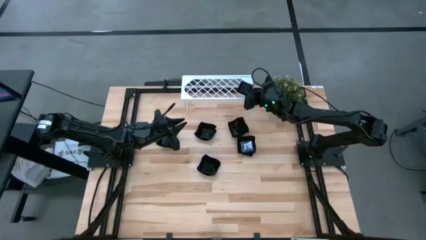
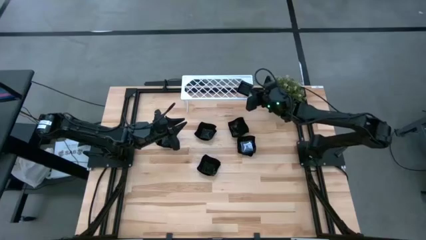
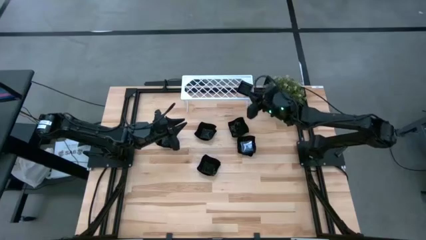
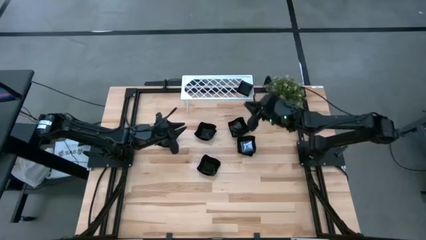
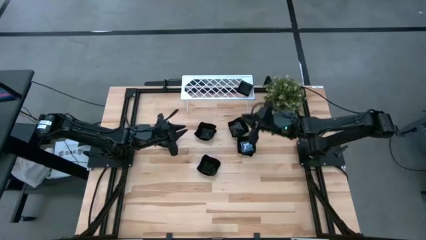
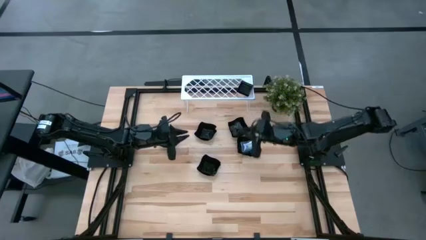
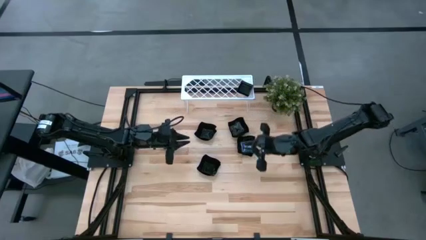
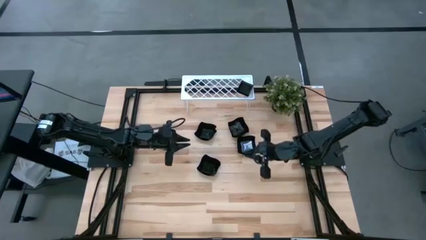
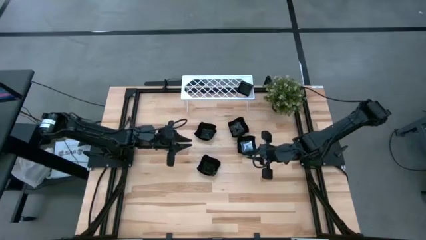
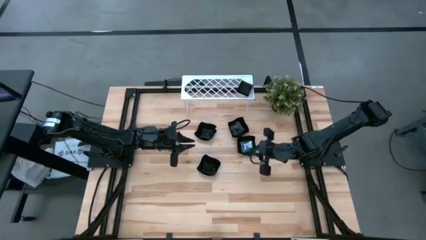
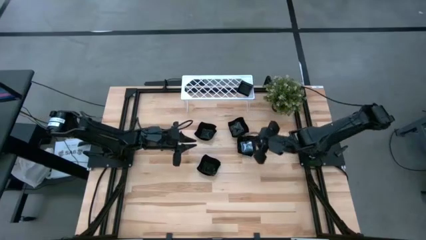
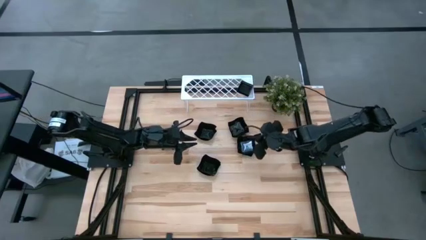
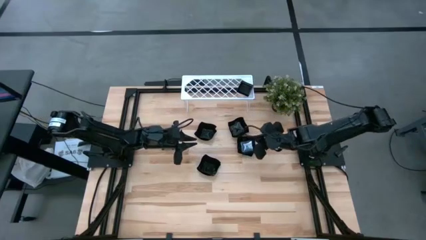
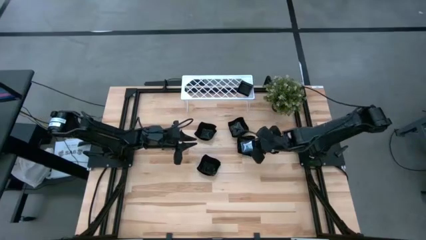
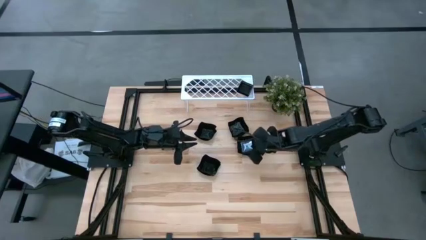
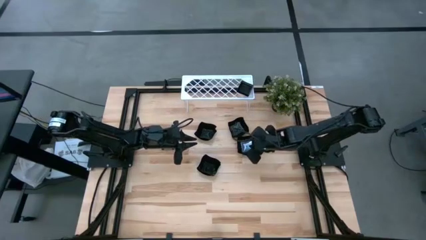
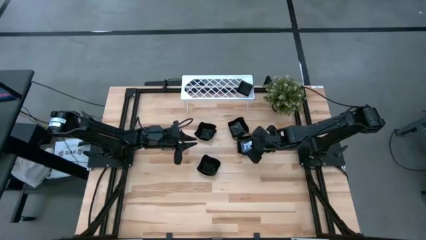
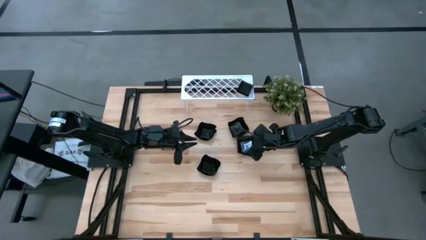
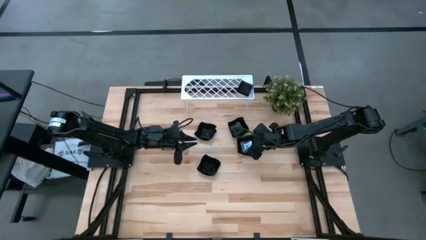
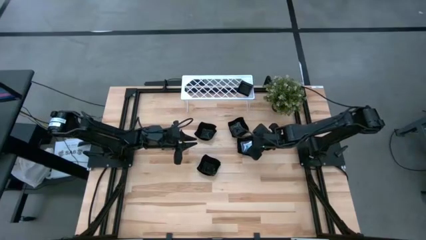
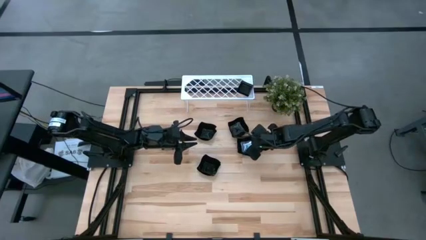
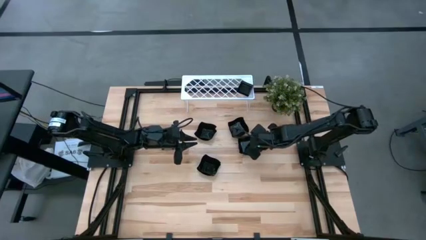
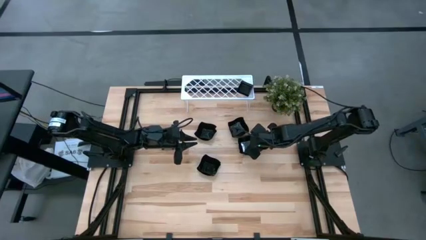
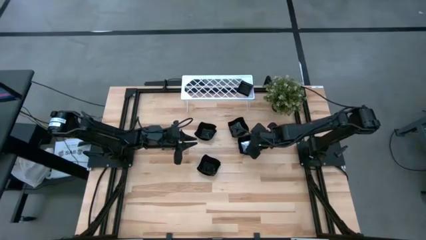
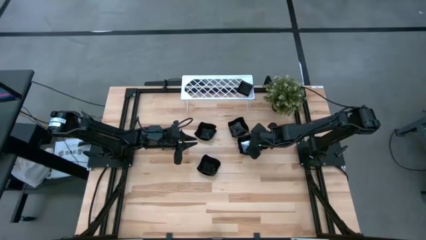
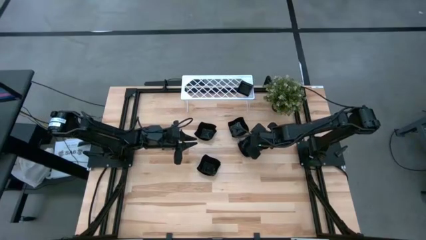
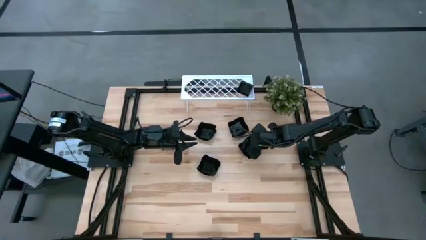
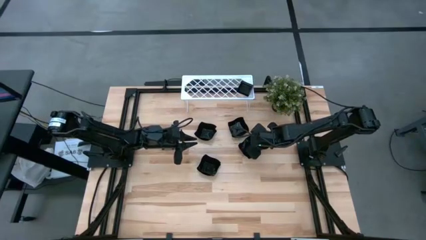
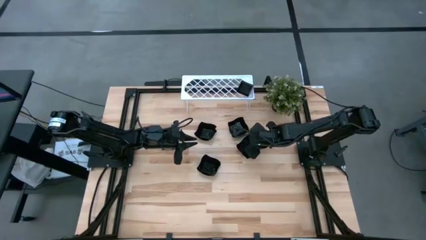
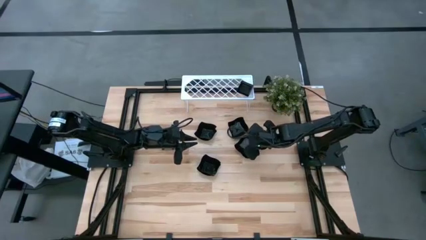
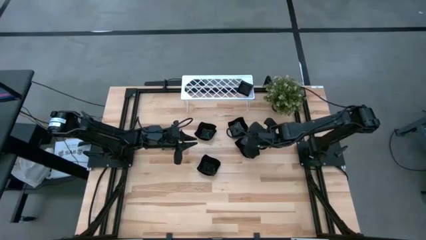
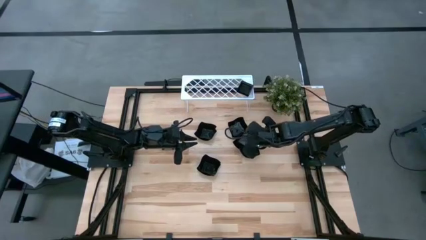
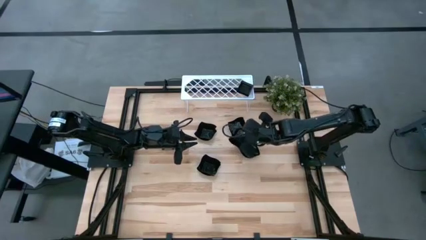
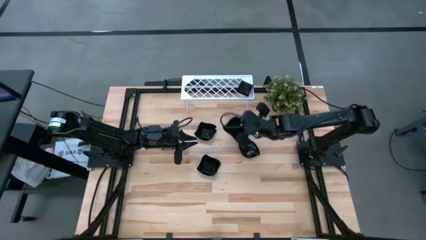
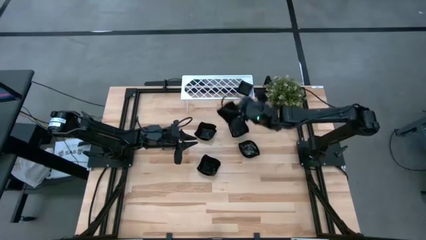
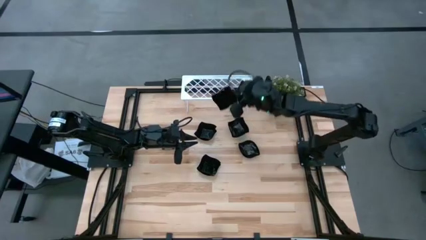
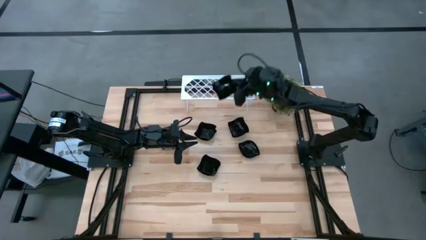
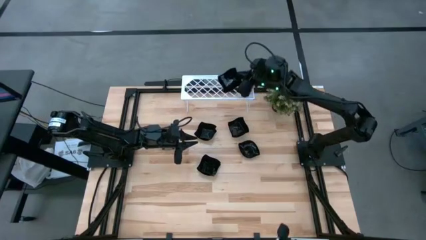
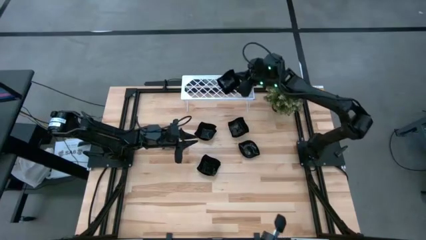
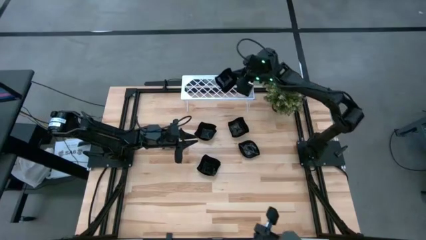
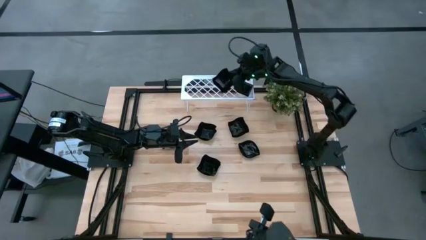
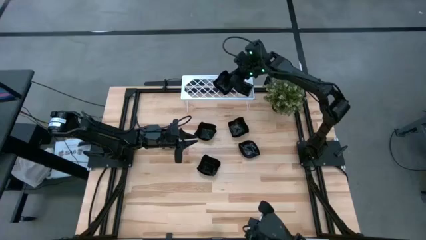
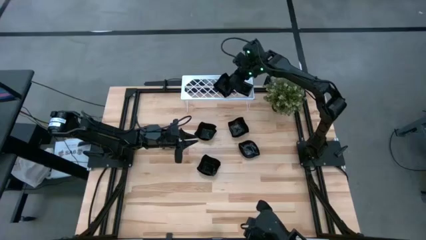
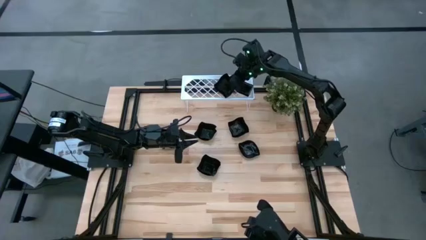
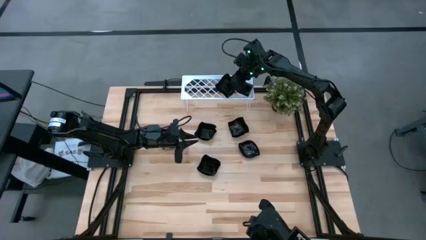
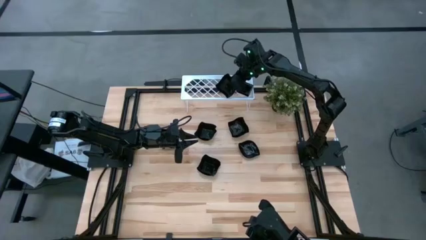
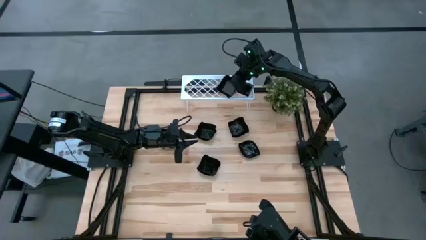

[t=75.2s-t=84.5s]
Task: Pick & Place Mini shaped plates
Put the black distorted square plate on the shelf

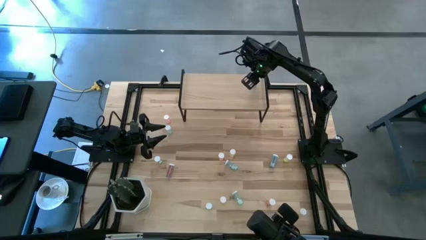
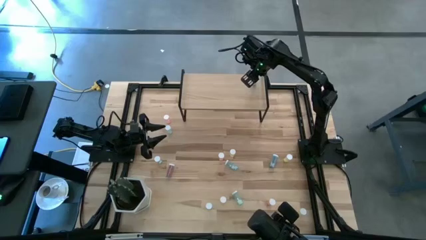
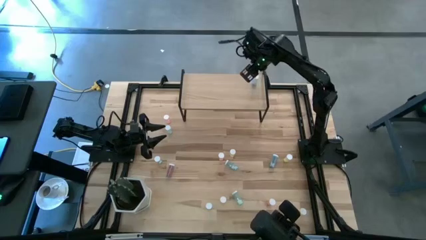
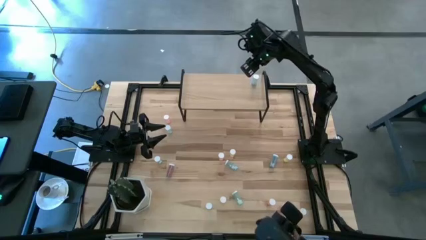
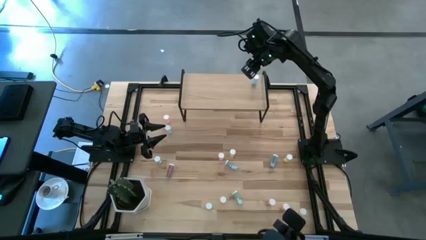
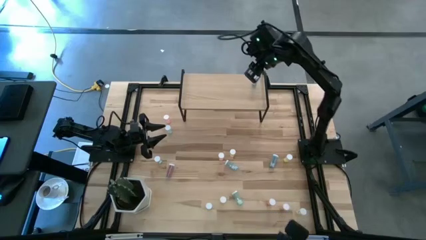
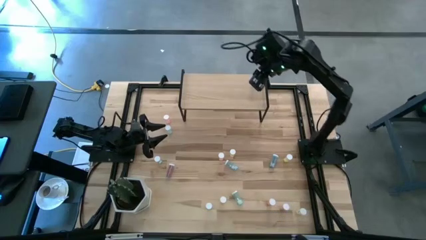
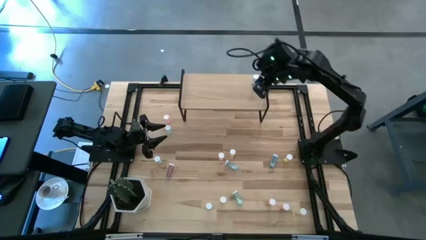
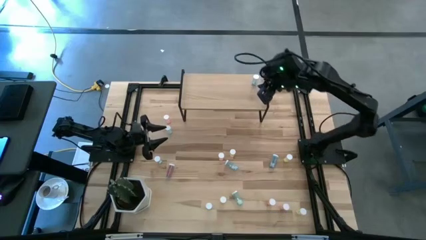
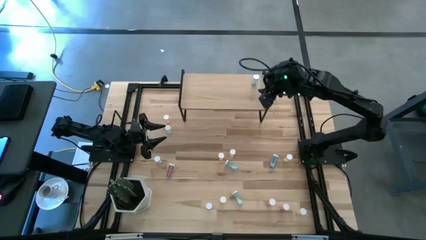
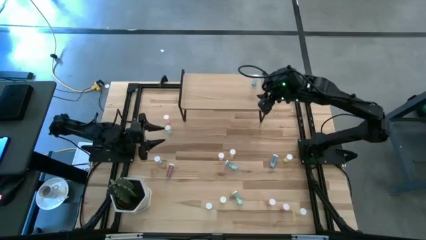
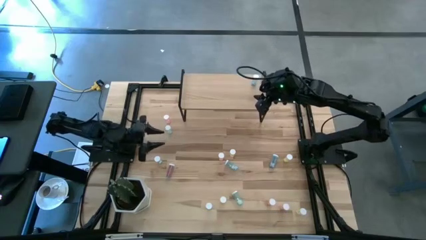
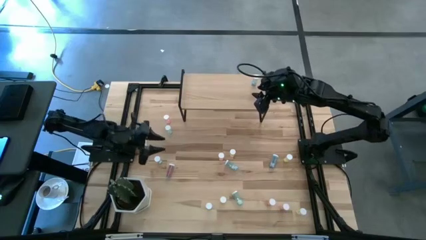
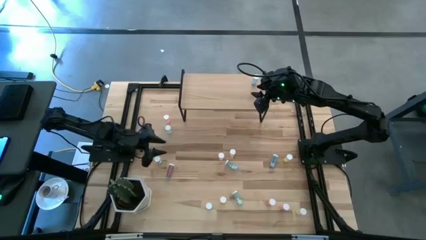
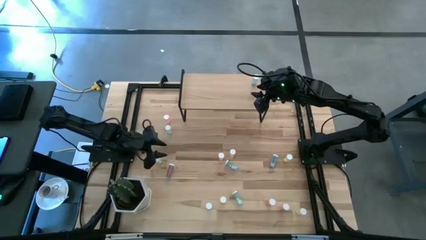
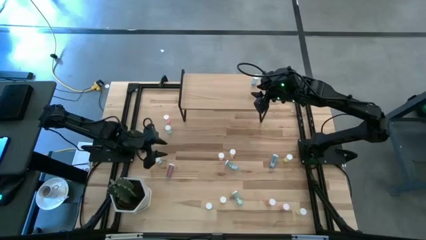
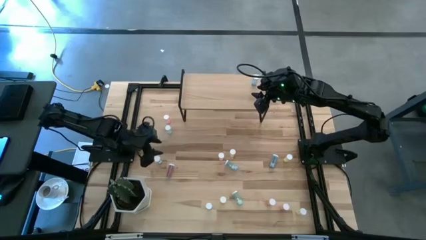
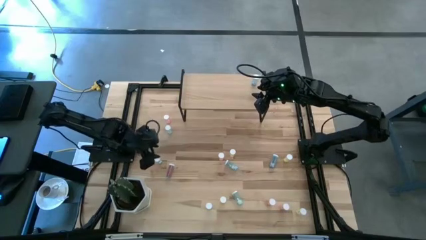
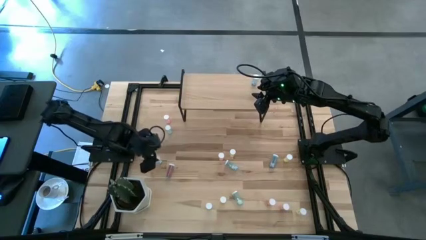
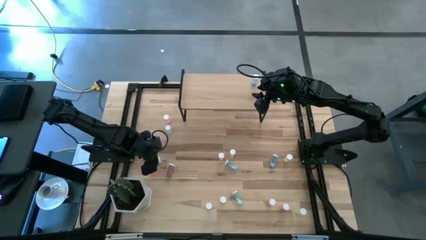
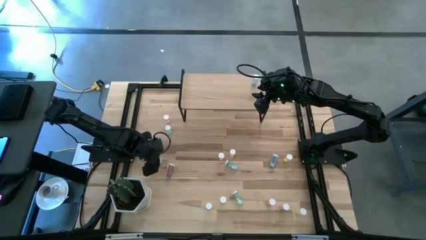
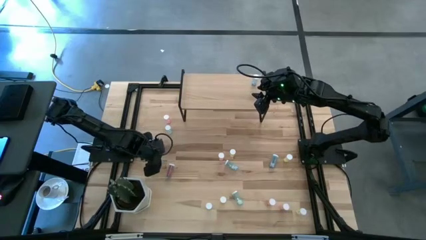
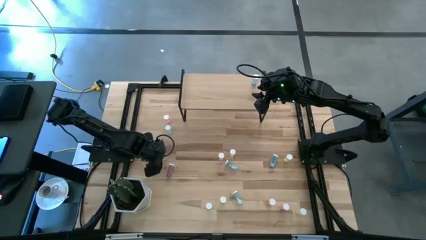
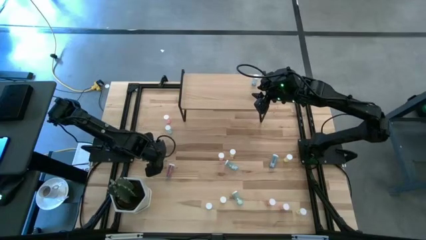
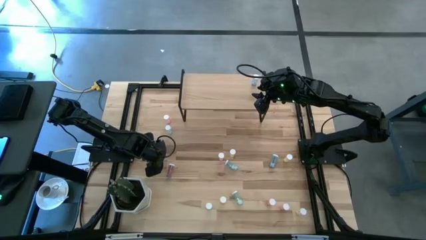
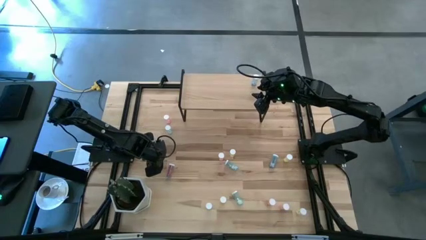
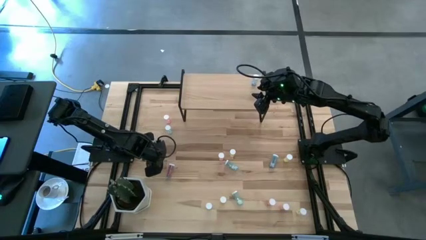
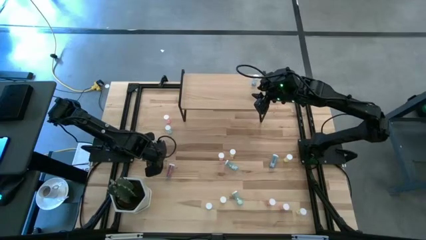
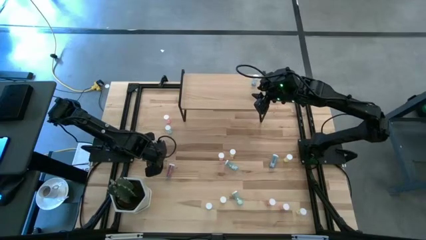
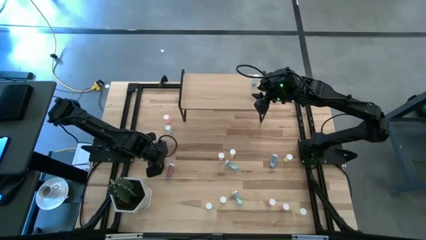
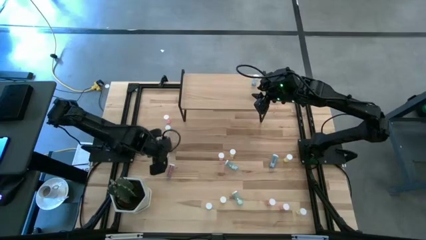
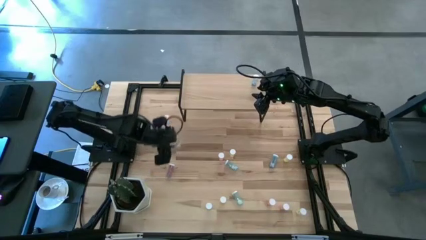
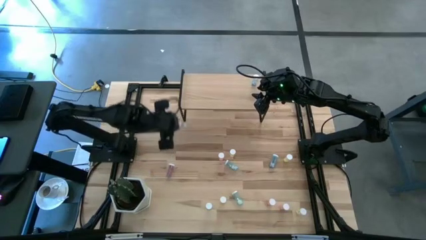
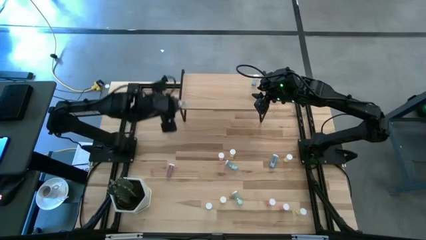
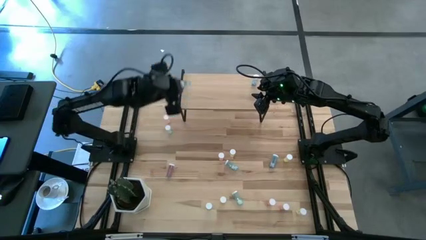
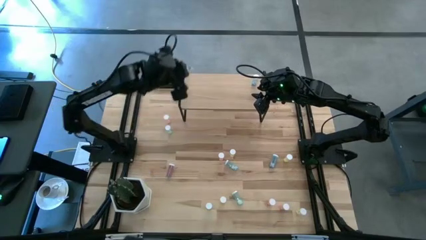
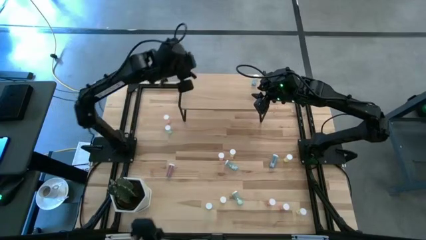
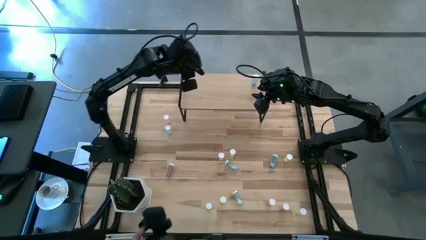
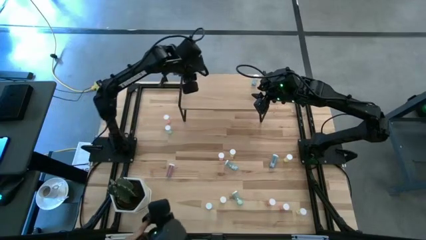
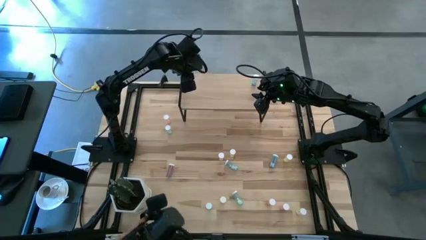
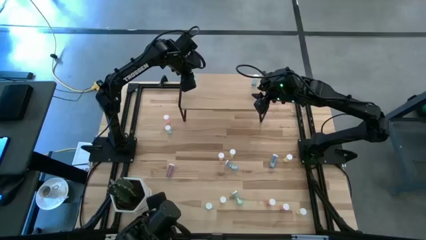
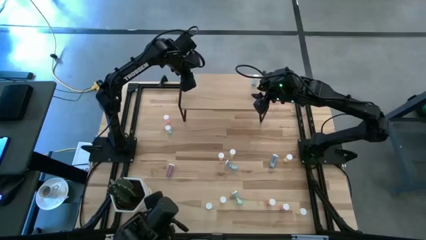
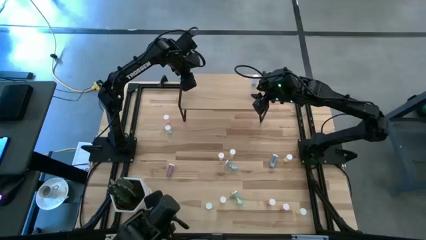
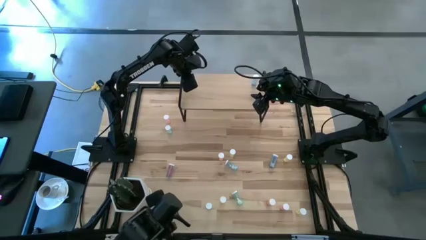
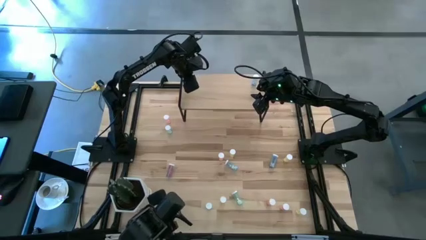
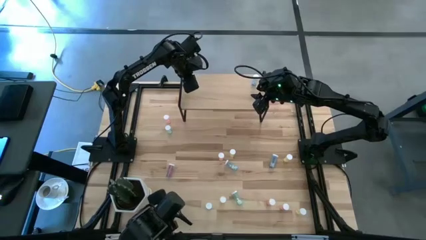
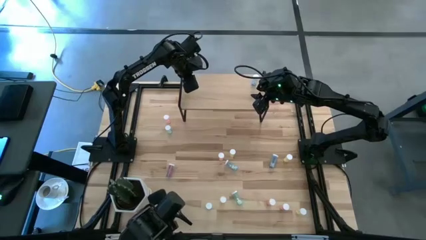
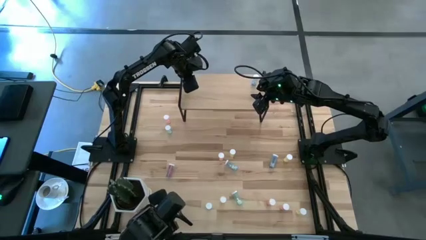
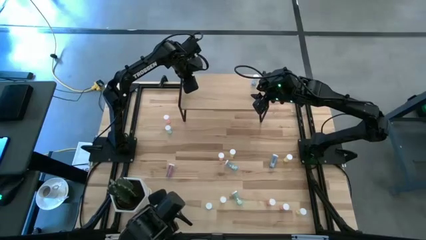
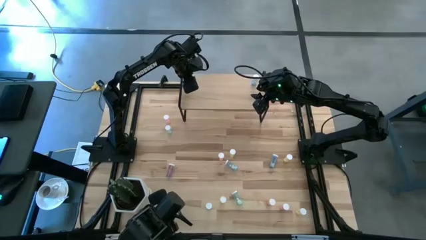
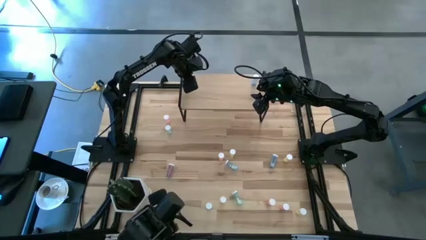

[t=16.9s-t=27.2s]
Task: Pick and place medicine bottles onto shelf by color
Put the green pill bottle on the shelf
